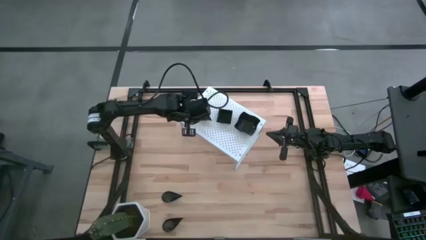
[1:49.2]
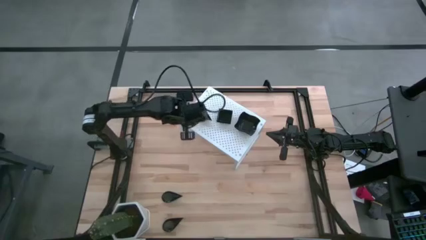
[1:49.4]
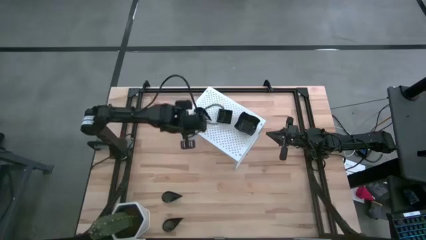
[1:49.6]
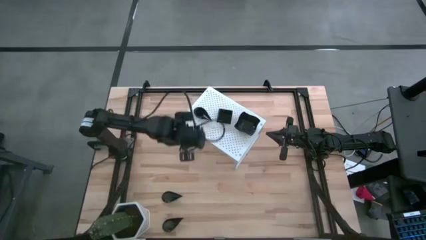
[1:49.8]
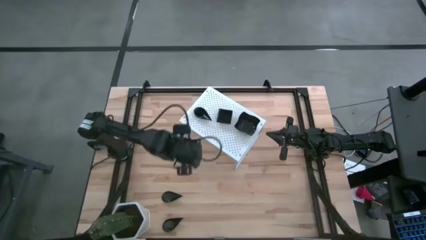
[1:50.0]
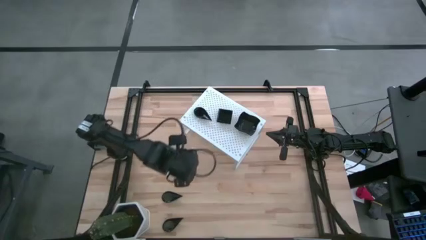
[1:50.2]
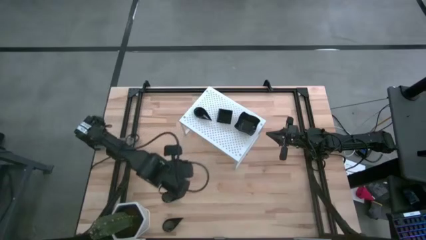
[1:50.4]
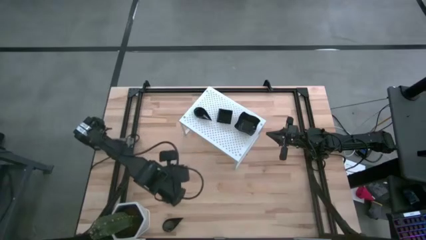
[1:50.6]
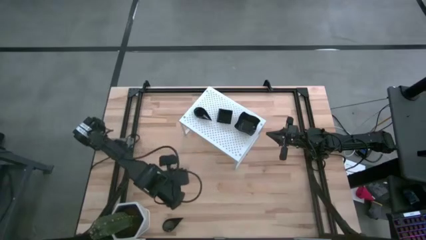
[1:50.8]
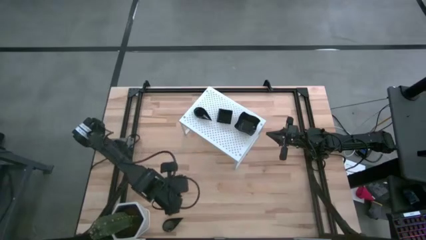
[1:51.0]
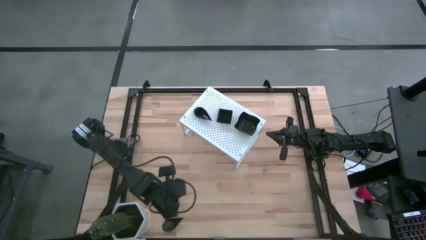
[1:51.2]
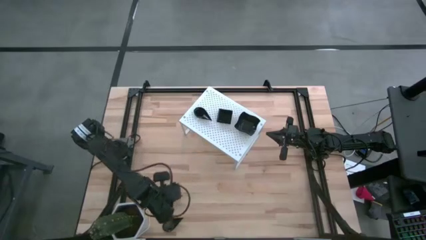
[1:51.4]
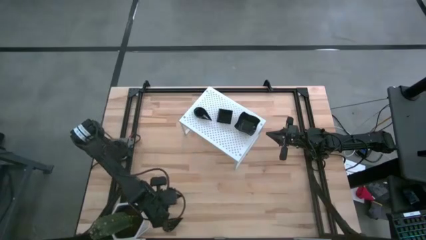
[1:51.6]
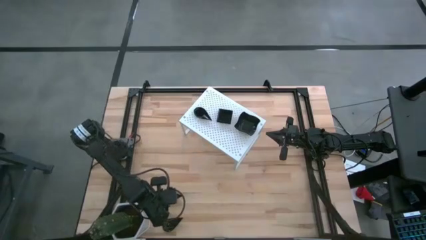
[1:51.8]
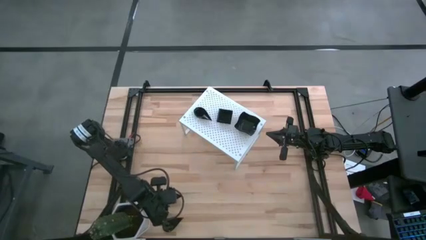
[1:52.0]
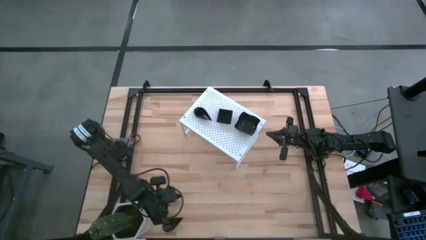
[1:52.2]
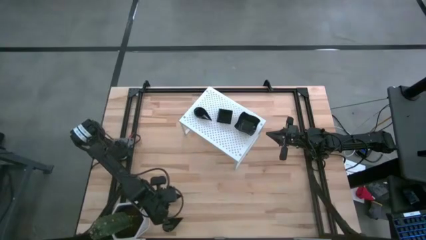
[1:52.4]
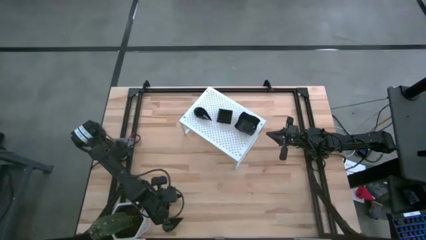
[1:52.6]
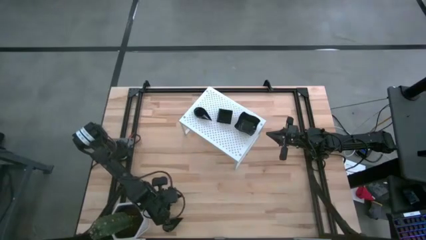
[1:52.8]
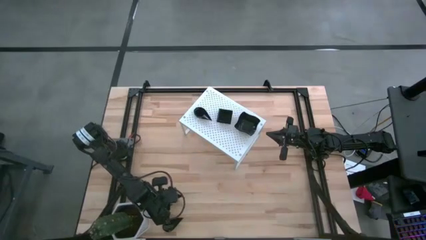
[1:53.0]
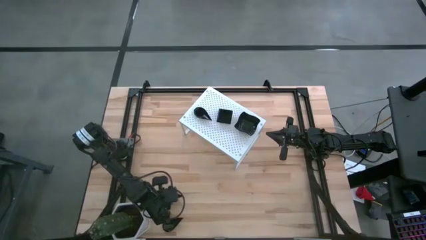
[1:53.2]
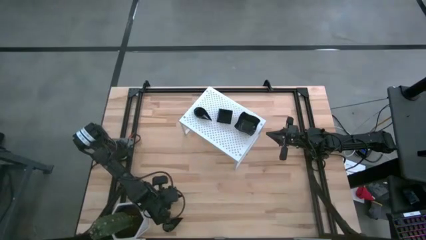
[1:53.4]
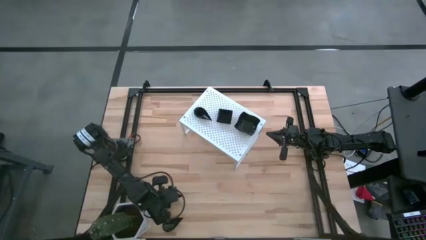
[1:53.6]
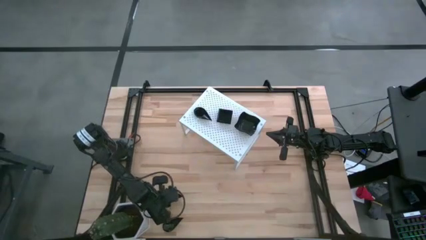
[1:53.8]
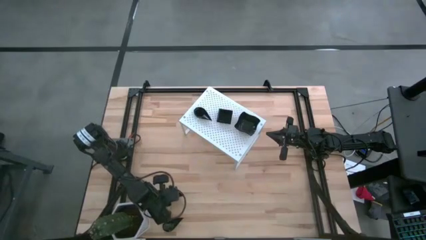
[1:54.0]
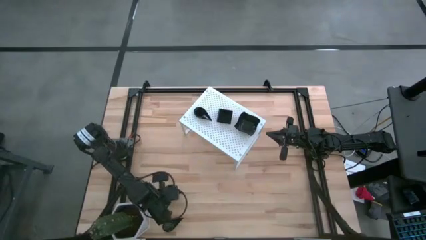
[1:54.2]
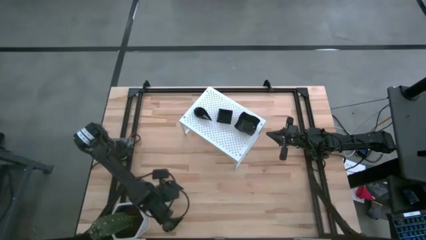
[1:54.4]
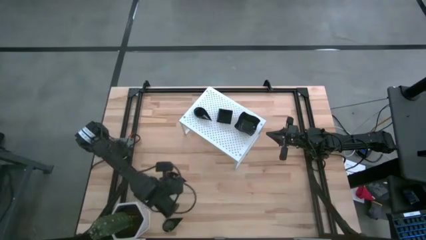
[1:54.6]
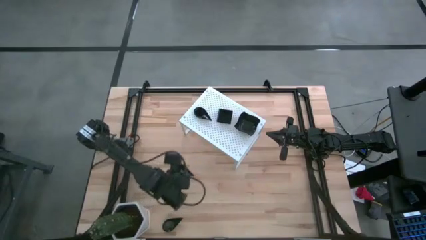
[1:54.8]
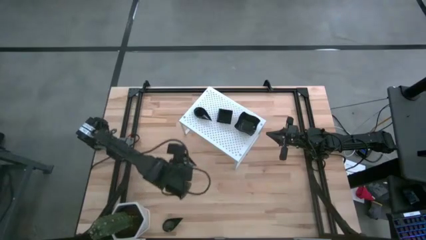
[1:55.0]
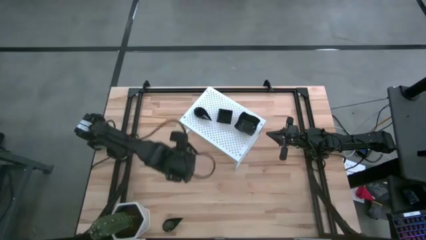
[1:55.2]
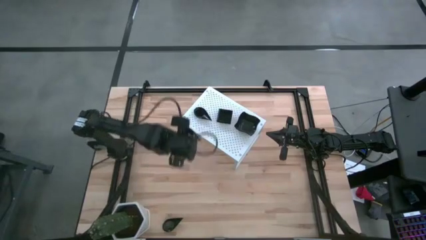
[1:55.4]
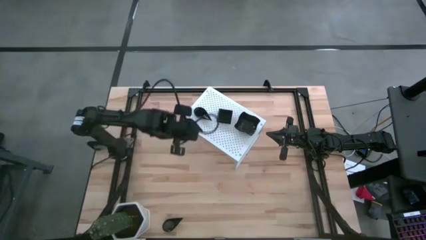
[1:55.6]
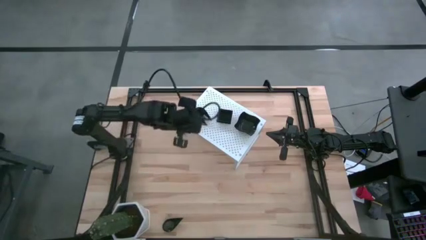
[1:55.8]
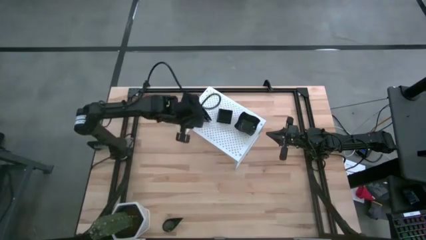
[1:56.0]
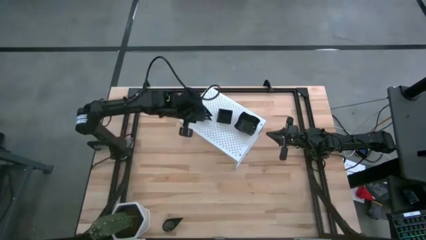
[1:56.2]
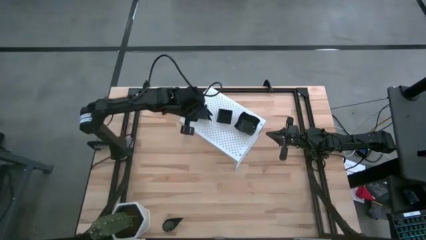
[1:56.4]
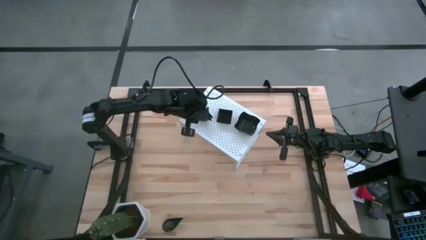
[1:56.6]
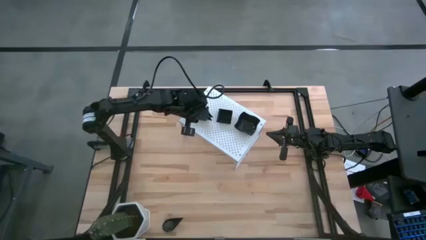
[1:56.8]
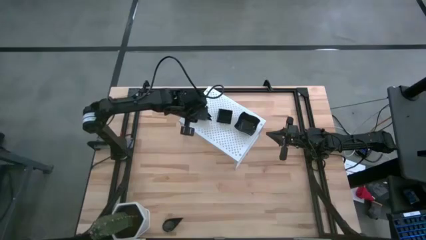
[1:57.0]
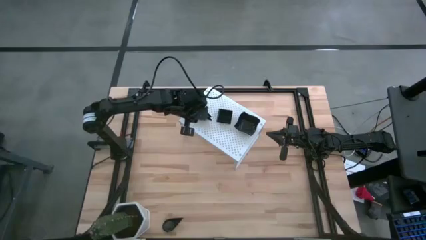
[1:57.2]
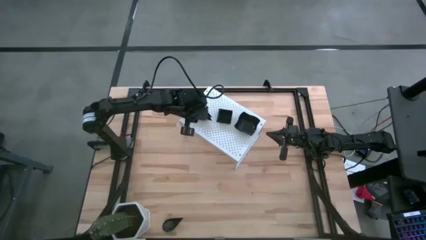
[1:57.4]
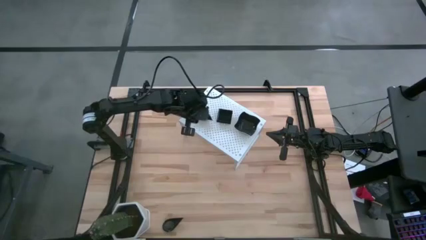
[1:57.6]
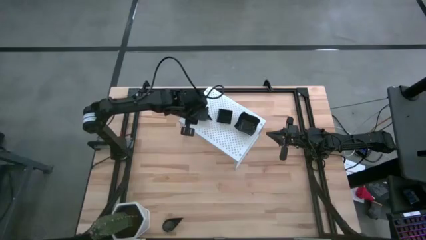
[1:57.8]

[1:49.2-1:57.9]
Task: Pick & Place Mini shaped plates
Stack the drop shaped plate on top of the other drop shaped plates on the shelf

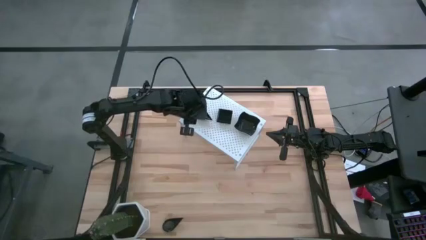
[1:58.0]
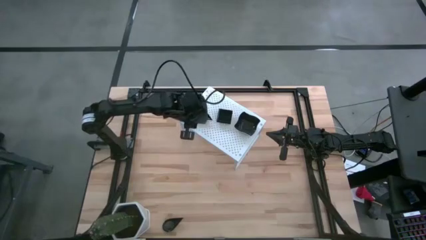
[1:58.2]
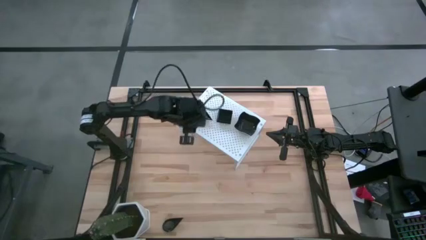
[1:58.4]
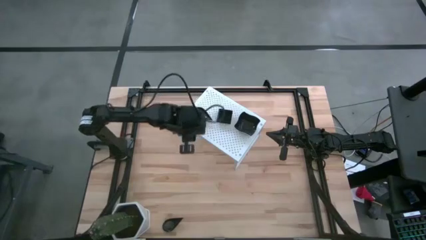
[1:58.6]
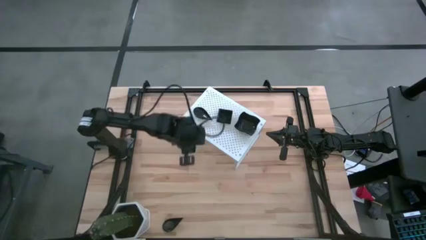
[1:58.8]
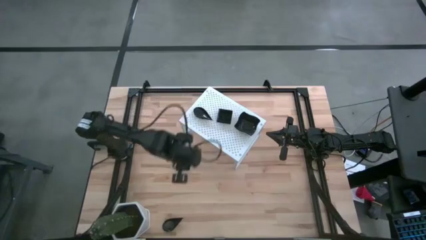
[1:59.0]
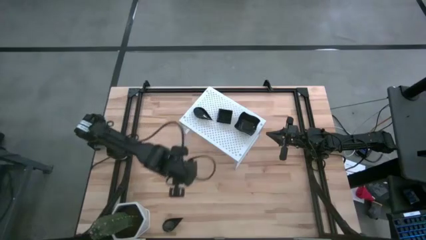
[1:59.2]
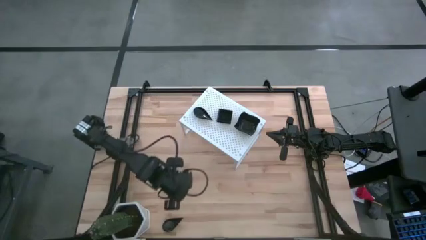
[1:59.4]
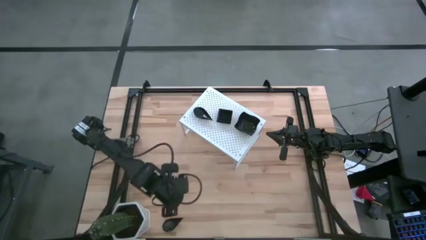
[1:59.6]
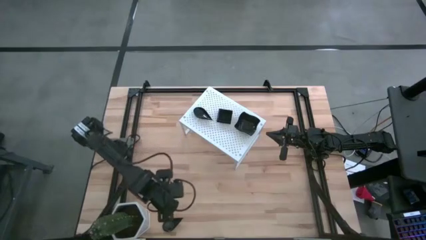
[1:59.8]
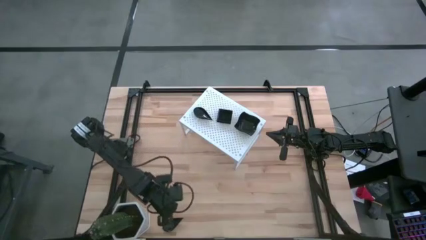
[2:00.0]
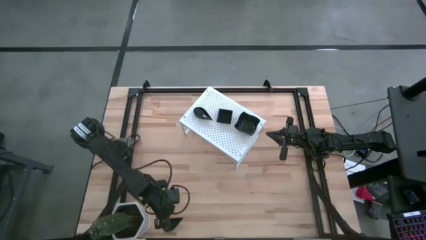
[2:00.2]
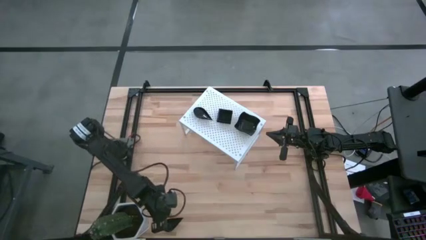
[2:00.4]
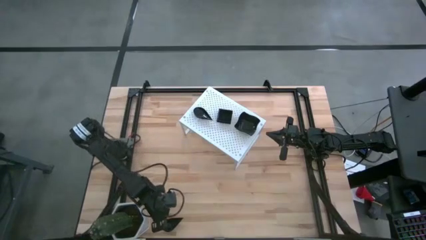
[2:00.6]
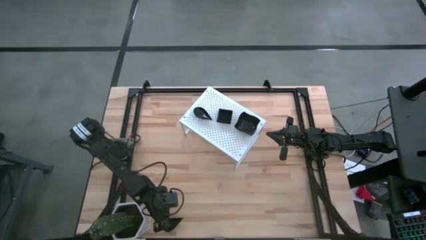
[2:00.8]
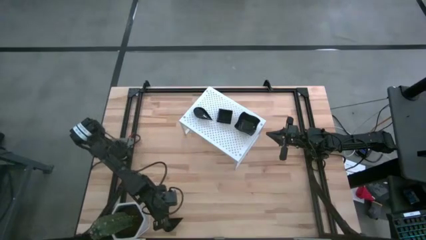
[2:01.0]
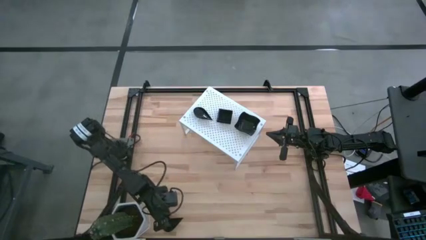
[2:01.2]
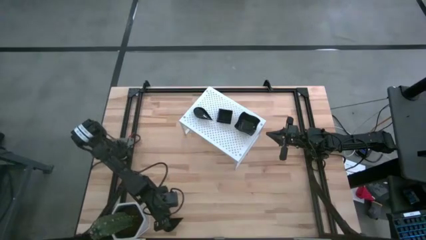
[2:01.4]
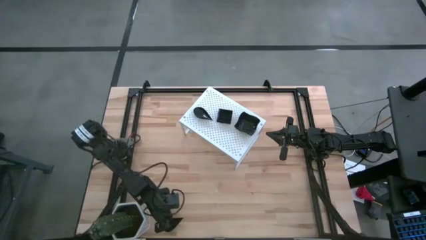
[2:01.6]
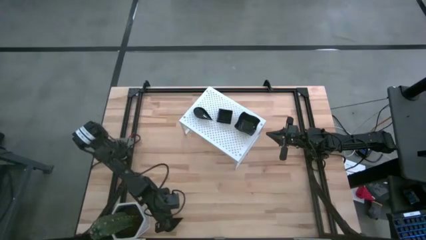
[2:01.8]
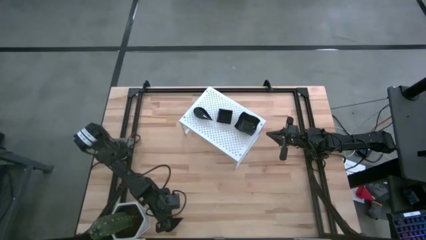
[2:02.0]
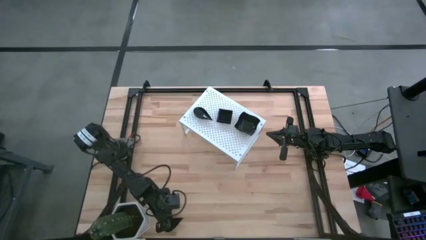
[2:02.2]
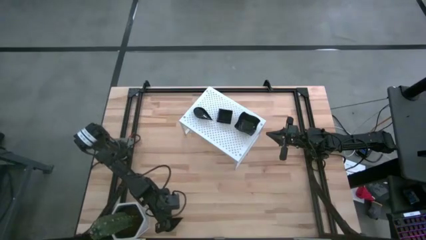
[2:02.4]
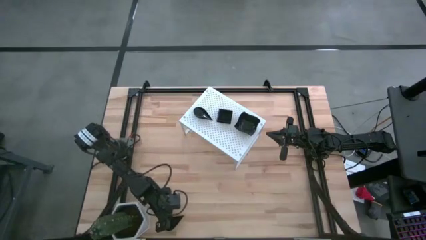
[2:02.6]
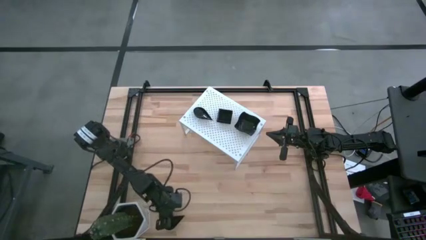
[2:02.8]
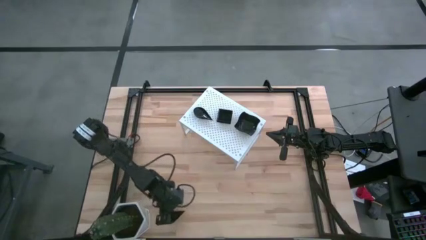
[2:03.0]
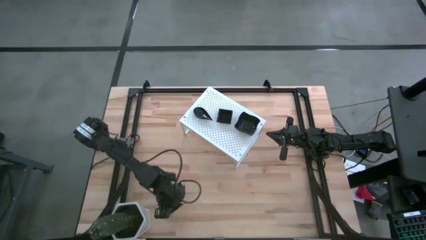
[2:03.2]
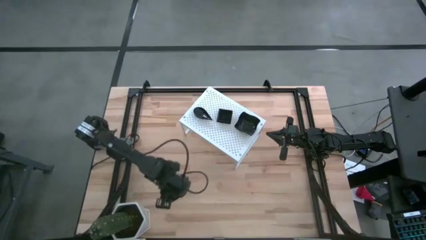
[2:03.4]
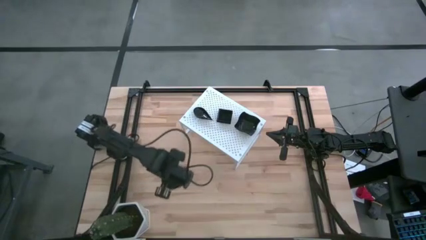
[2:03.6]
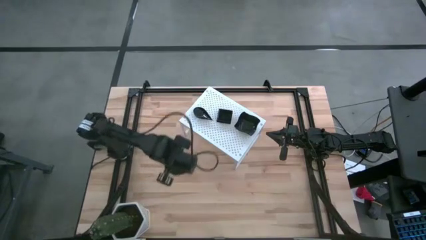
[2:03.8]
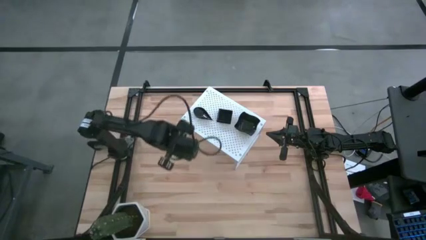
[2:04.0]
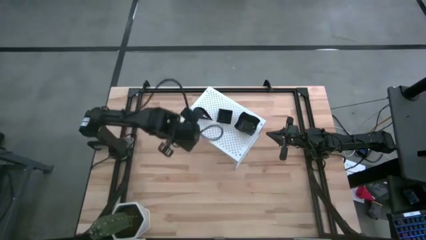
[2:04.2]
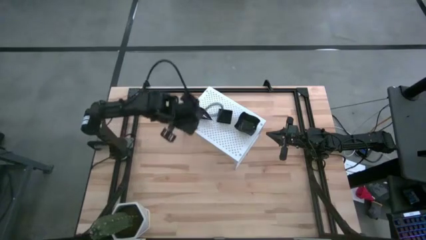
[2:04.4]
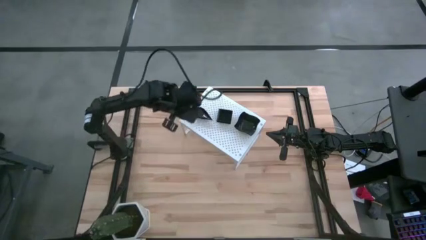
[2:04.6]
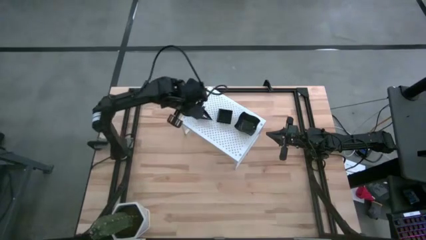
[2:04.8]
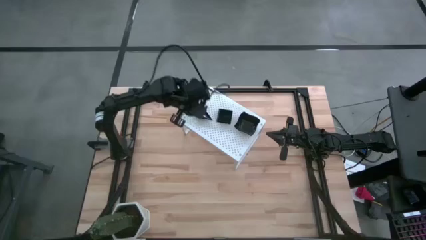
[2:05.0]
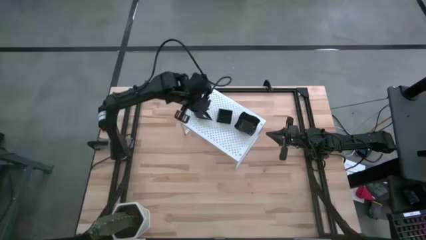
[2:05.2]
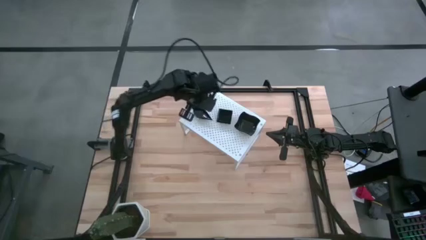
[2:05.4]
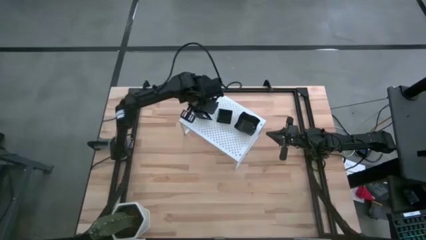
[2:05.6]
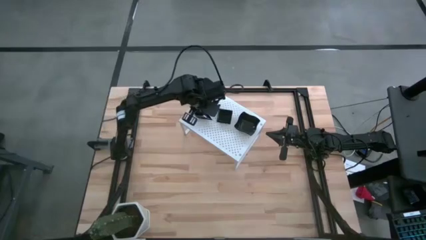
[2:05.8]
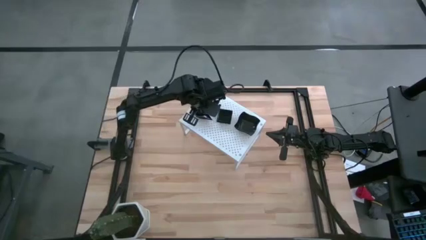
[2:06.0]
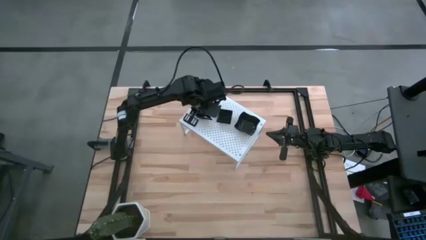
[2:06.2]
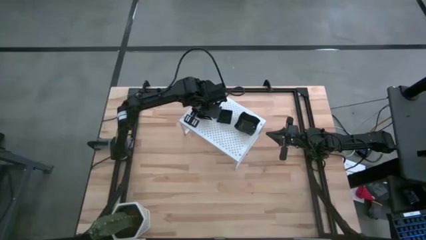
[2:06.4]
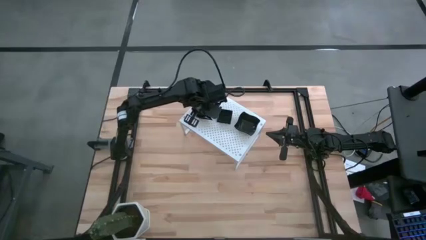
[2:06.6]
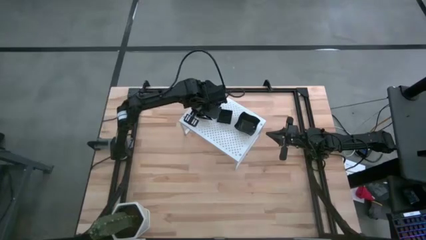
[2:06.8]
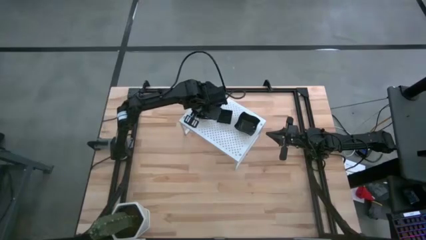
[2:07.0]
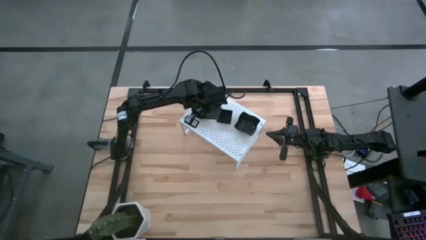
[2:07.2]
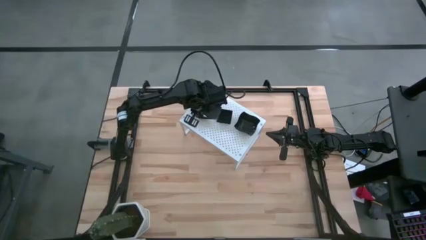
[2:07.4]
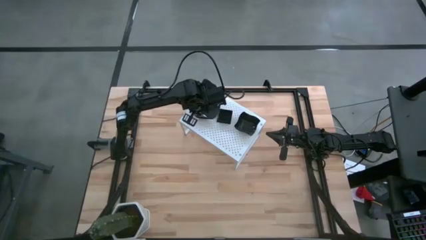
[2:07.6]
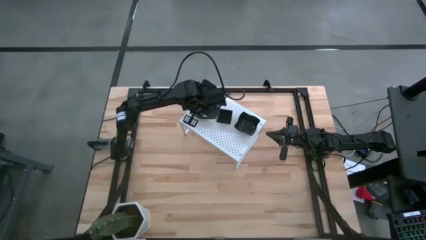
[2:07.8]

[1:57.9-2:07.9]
Stack the drop shaped plate on top of the other drop shaped plates on the shelf
